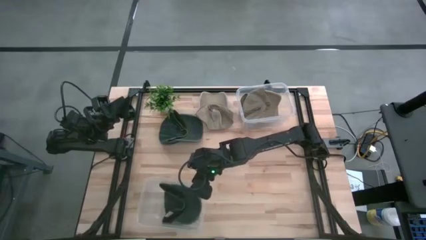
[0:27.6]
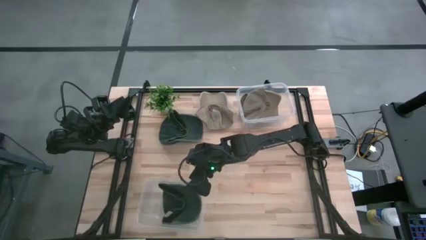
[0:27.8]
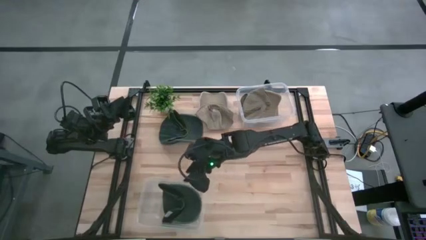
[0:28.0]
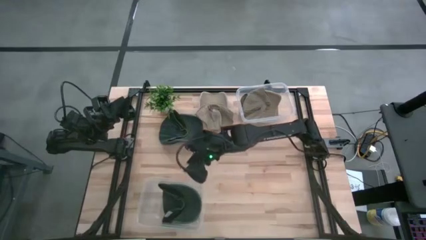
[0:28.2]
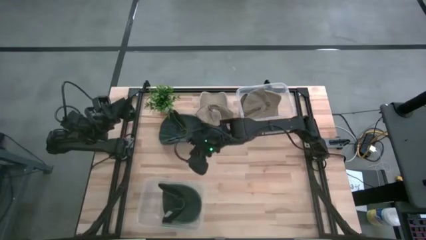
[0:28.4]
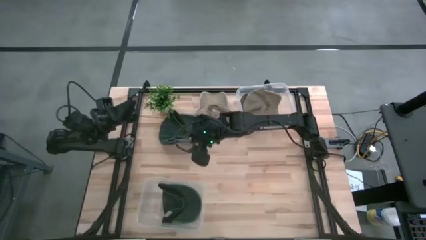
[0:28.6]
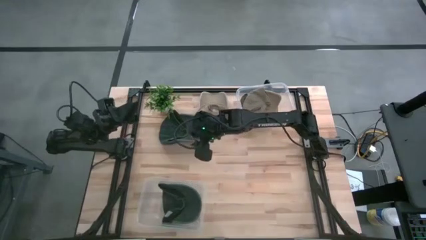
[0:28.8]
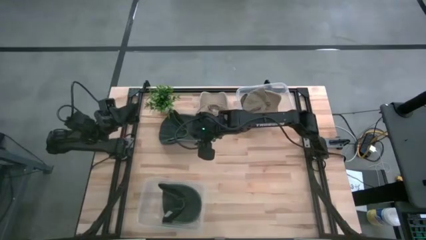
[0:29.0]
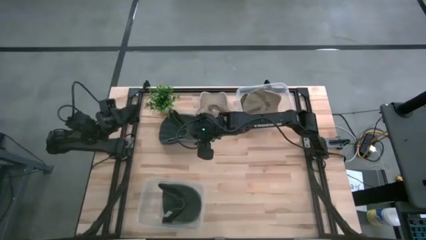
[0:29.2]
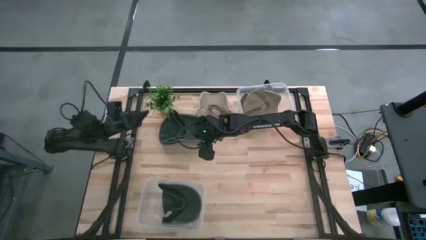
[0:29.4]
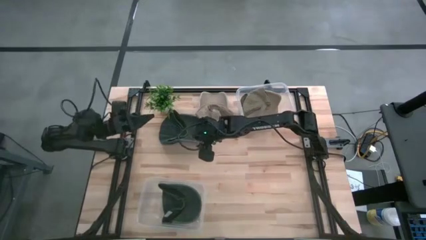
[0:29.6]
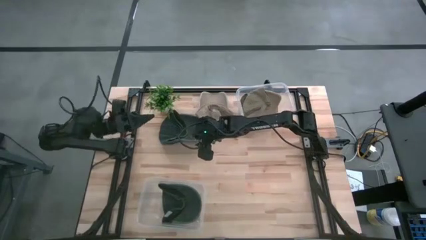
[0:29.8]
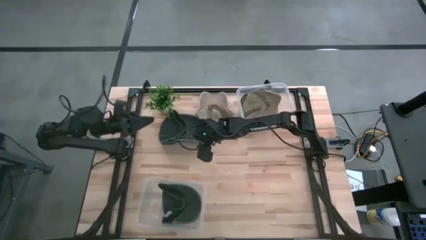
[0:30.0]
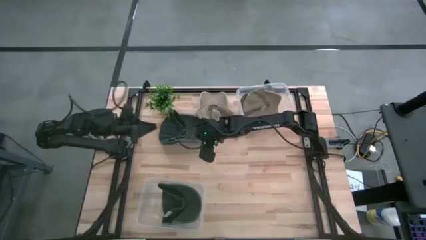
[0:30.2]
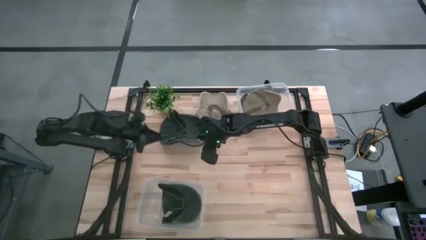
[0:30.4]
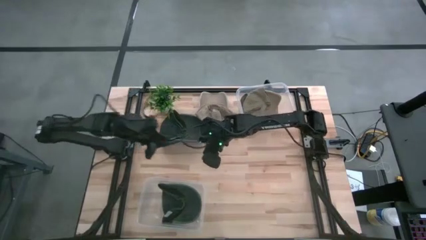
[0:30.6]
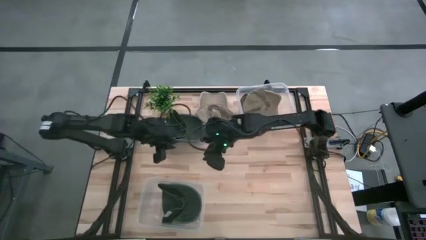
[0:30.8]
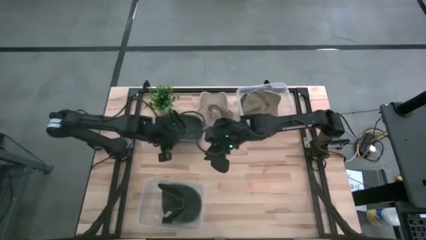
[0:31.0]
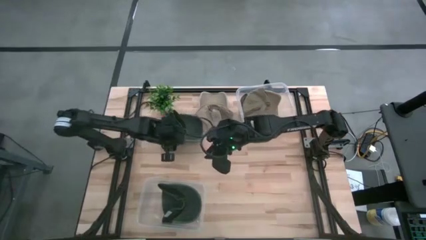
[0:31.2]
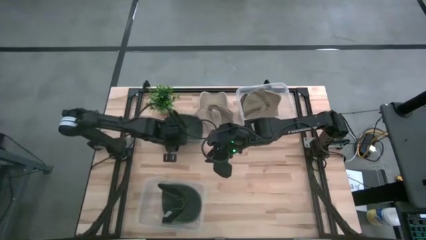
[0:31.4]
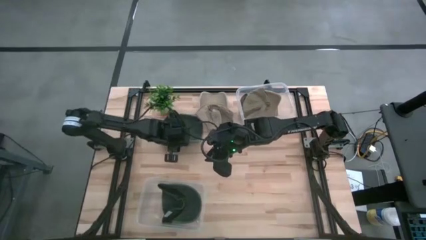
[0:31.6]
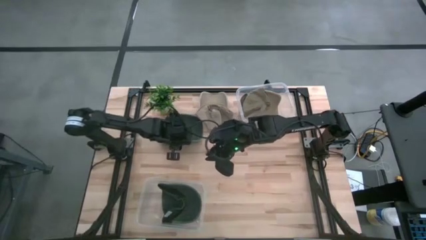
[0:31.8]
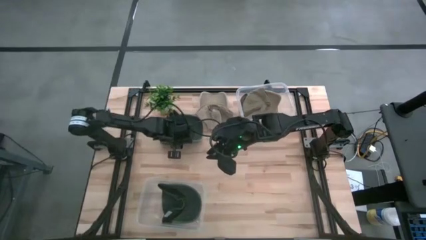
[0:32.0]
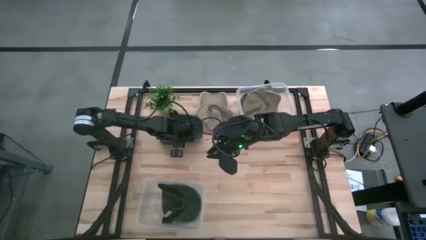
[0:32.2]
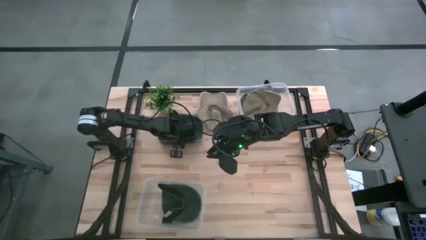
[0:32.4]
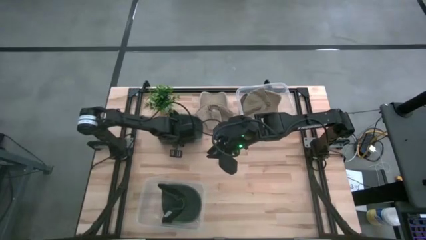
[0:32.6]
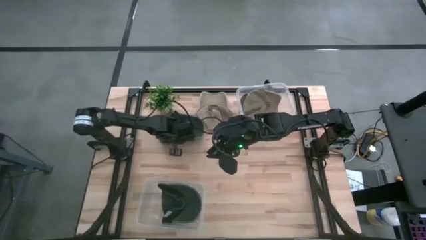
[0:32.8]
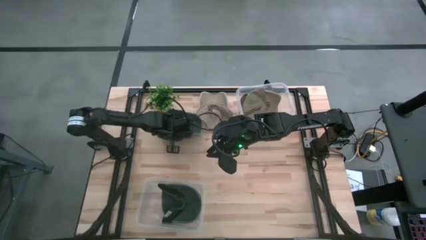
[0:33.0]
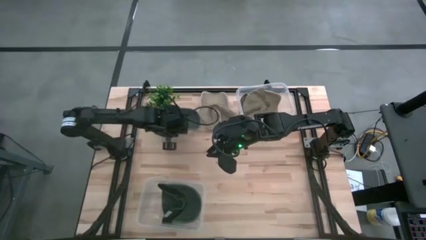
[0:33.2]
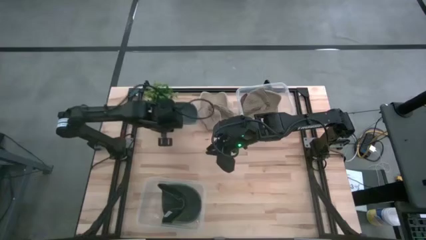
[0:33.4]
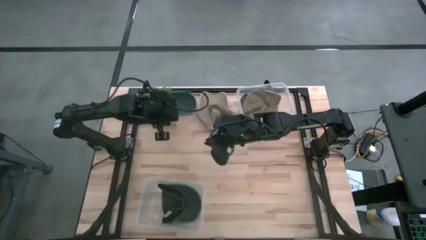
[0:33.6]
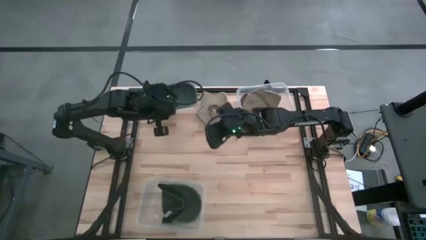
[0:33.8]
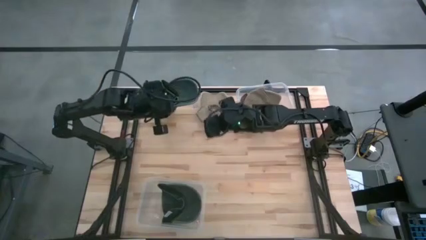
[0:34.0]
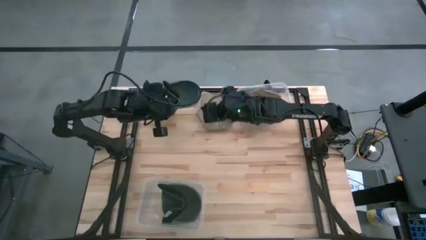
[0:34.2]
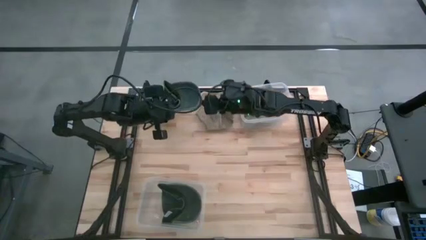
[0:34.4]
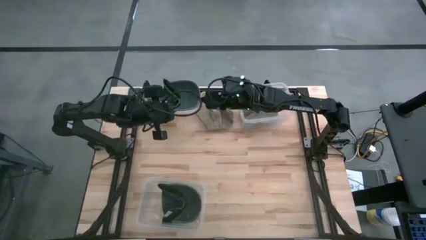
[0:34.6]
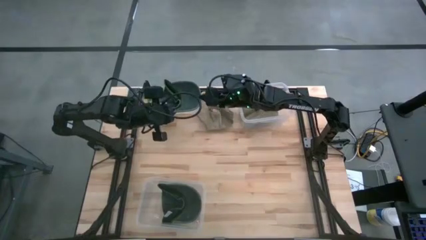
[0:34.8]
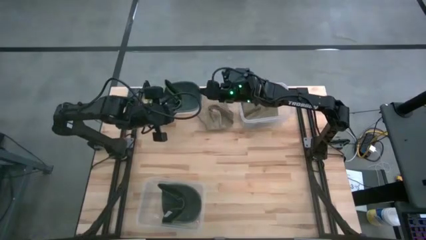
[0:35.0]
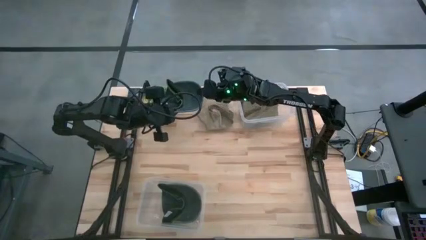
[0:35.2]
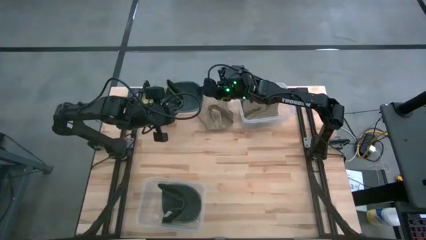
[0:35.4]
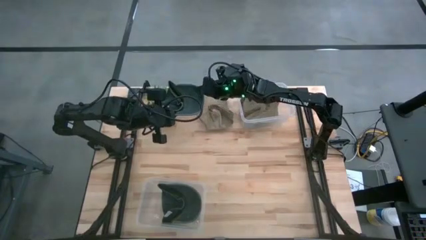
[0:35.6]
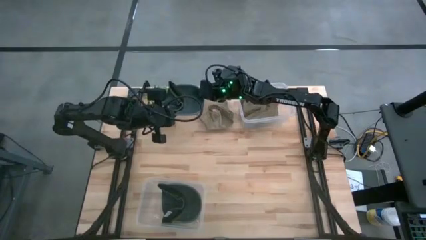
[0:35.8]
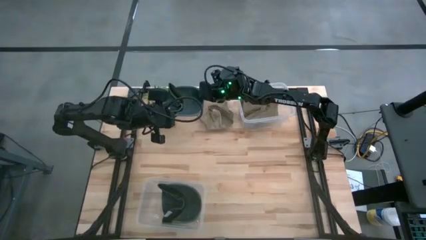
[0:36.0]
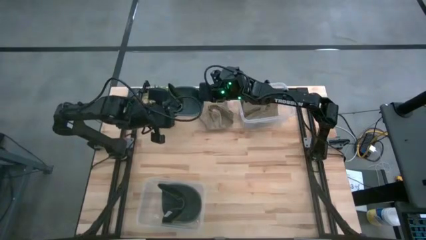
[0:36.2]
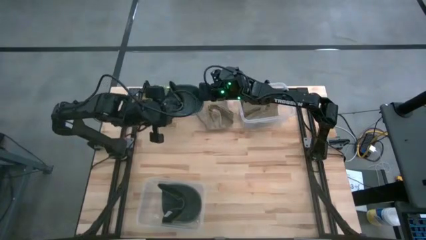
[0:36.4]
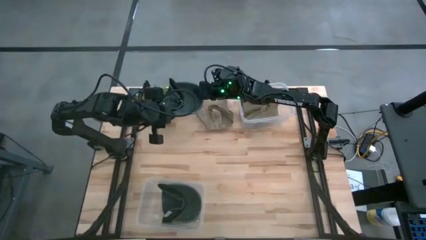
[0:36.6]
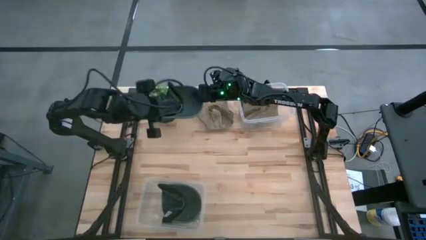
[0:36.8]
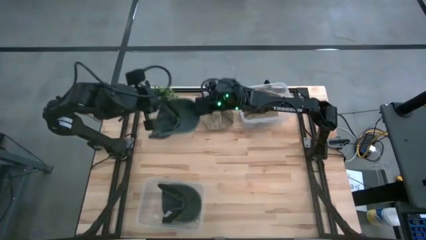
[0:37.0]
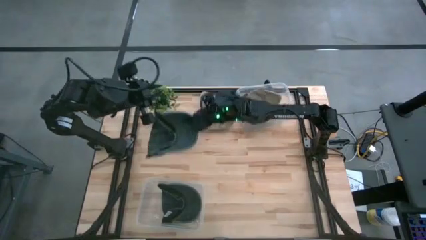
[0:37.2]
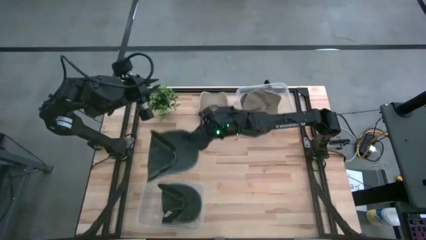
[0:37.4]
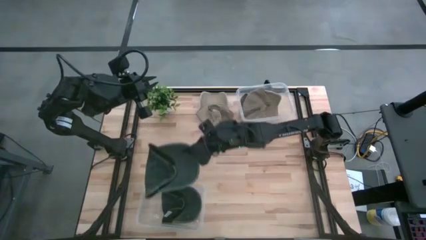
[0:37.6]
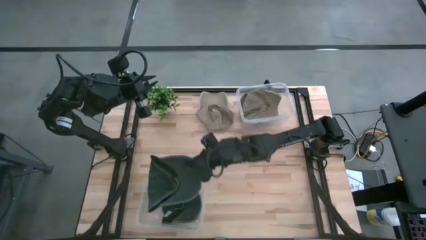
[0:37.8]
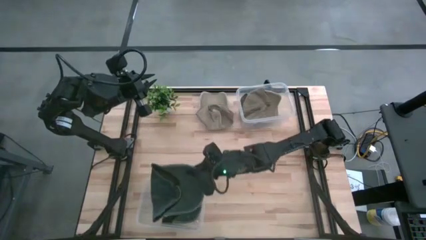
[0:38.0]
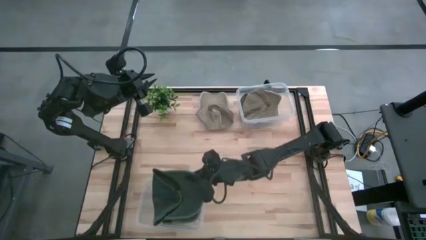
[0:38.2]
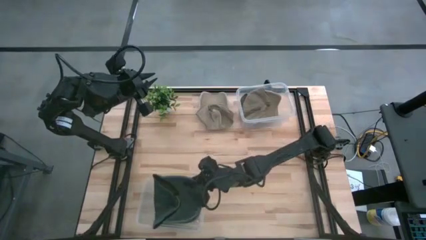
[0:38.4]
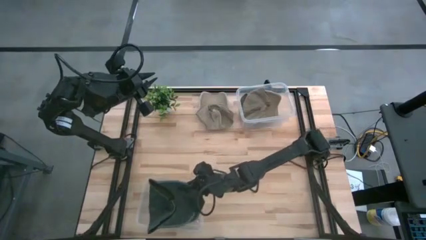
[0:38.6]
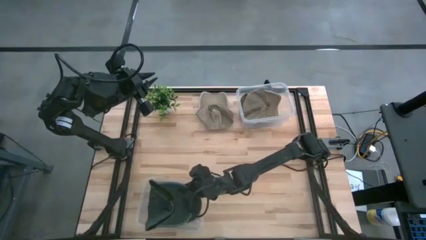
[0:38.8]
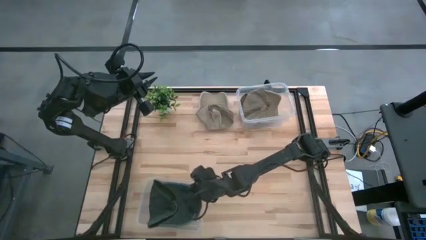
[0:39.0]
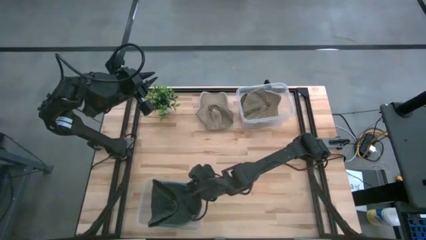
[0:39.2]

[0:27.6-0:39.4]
Task: Pick & Place hat
Put the green cap into the bottom transparent bin
